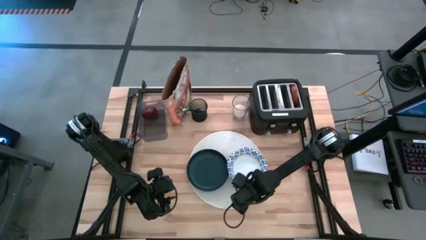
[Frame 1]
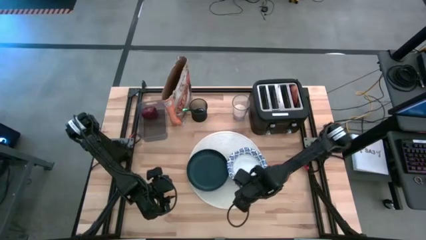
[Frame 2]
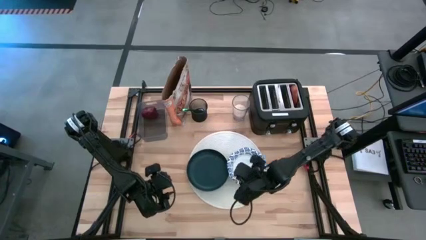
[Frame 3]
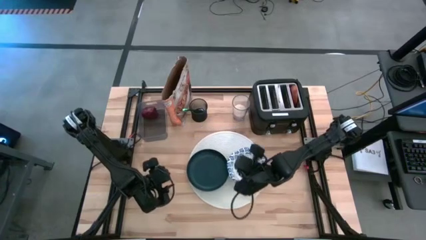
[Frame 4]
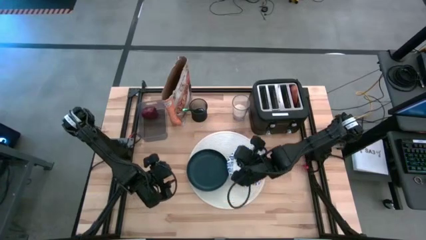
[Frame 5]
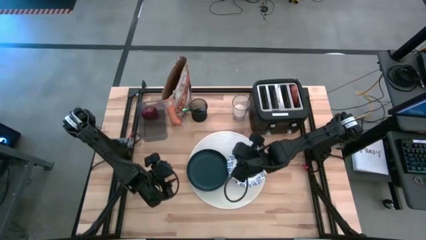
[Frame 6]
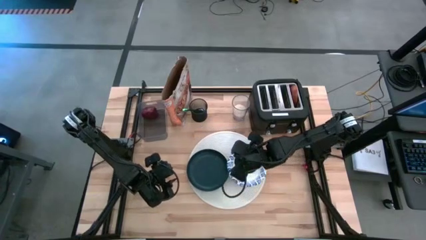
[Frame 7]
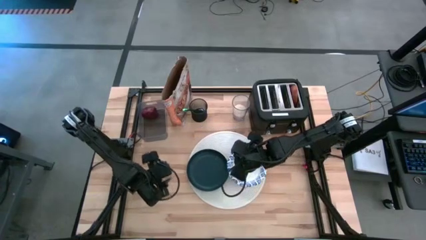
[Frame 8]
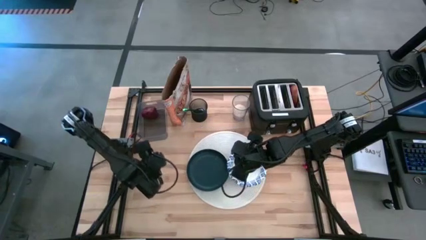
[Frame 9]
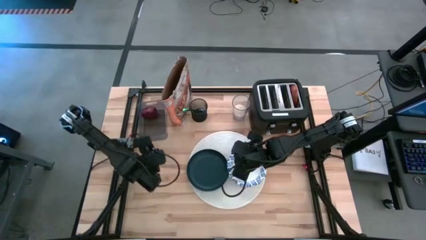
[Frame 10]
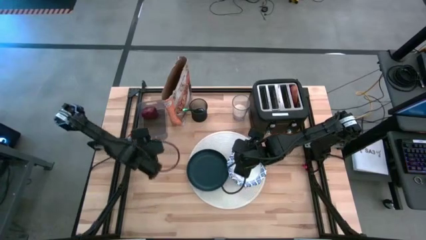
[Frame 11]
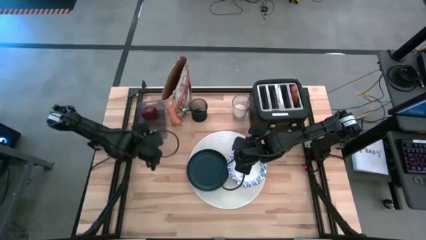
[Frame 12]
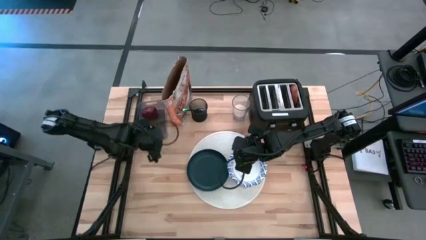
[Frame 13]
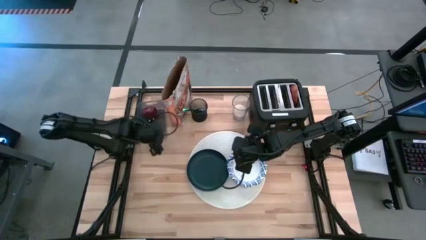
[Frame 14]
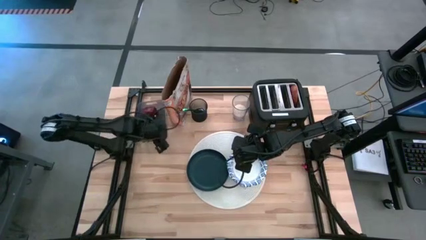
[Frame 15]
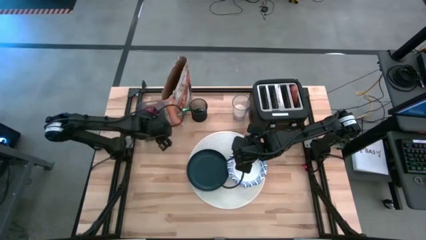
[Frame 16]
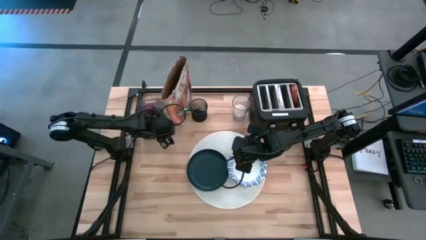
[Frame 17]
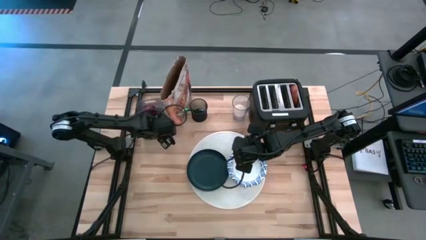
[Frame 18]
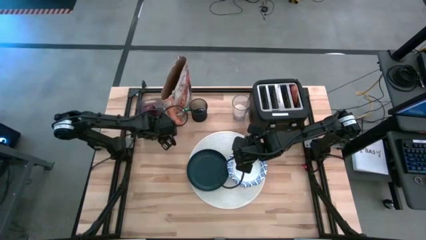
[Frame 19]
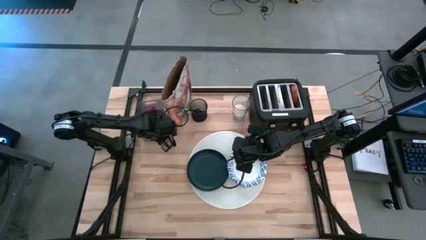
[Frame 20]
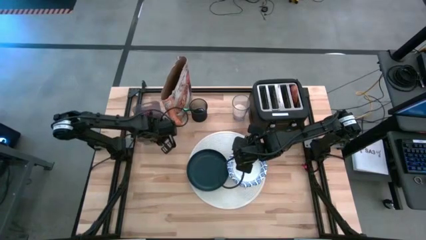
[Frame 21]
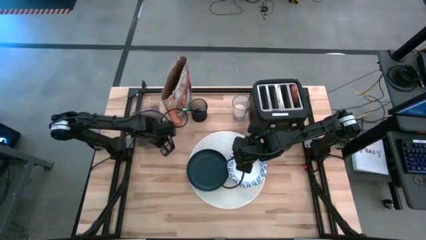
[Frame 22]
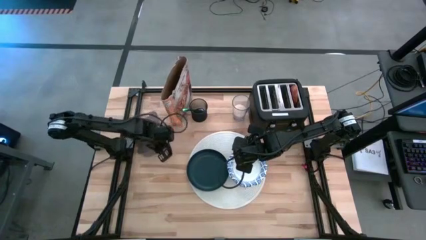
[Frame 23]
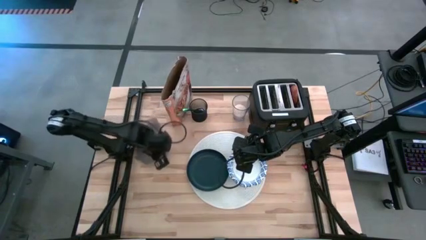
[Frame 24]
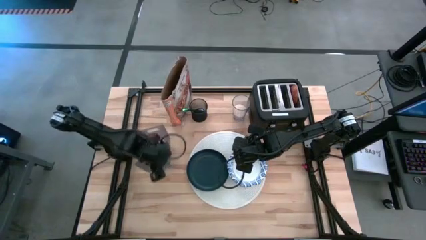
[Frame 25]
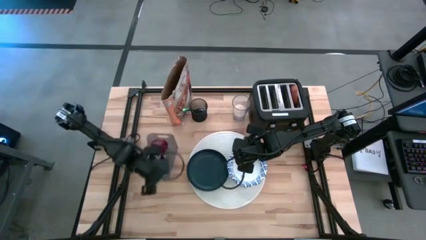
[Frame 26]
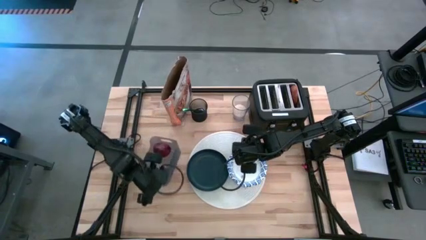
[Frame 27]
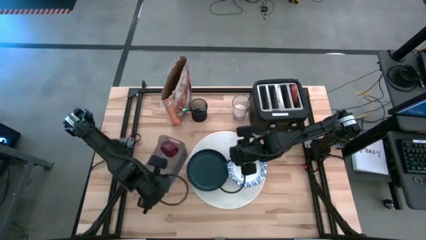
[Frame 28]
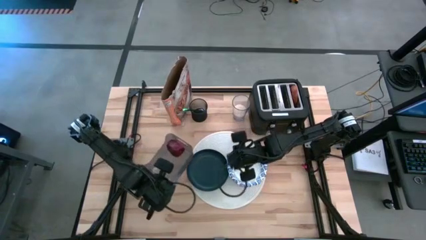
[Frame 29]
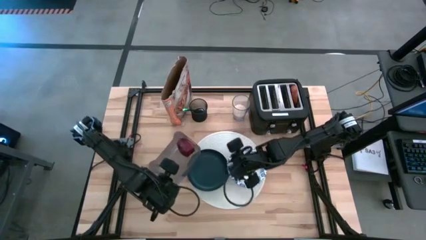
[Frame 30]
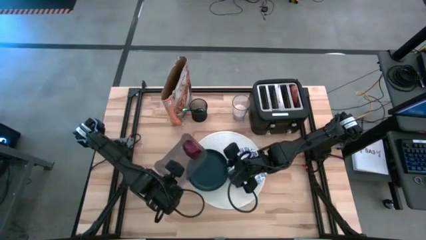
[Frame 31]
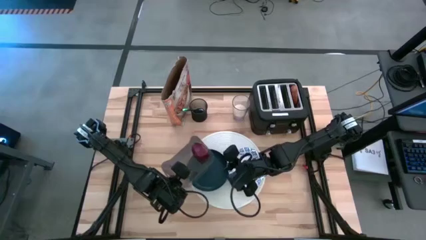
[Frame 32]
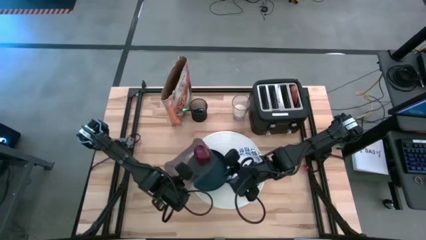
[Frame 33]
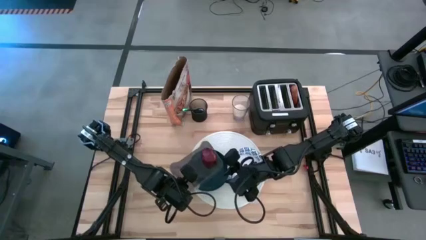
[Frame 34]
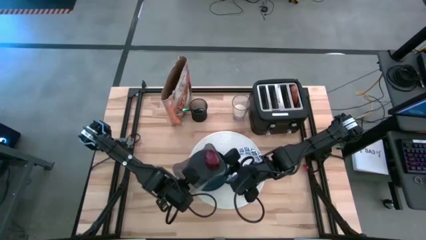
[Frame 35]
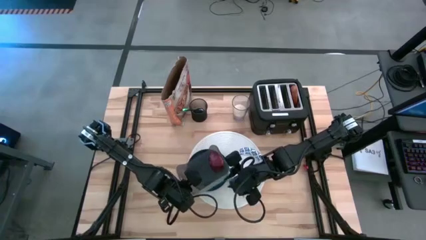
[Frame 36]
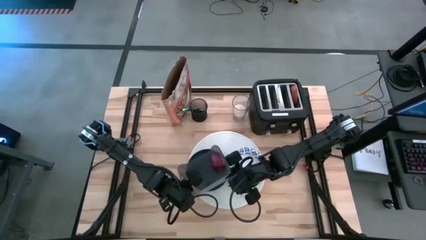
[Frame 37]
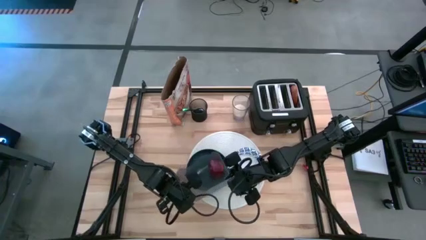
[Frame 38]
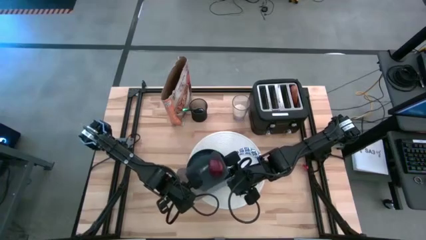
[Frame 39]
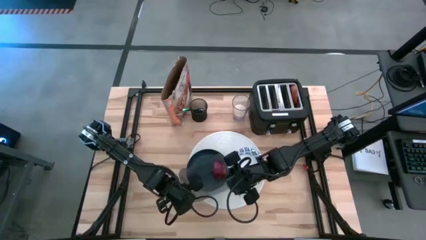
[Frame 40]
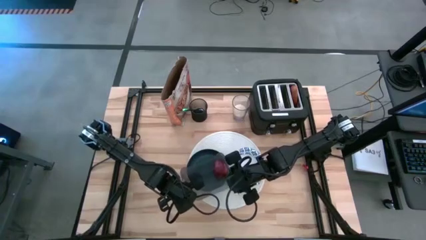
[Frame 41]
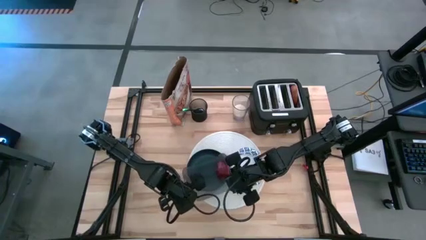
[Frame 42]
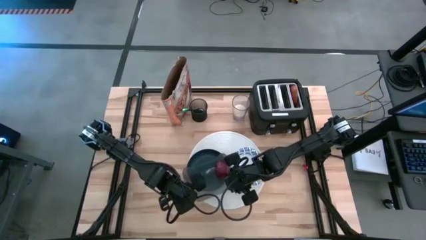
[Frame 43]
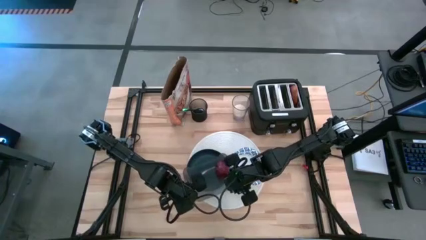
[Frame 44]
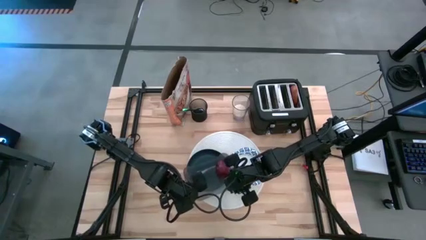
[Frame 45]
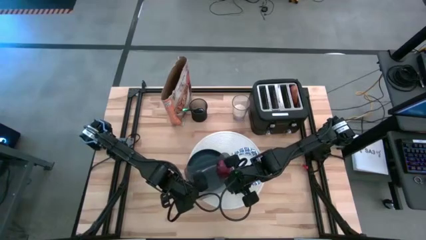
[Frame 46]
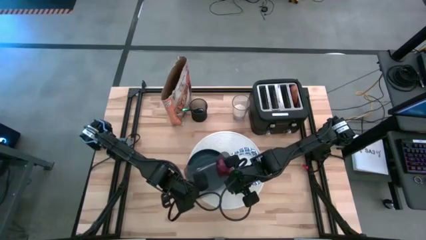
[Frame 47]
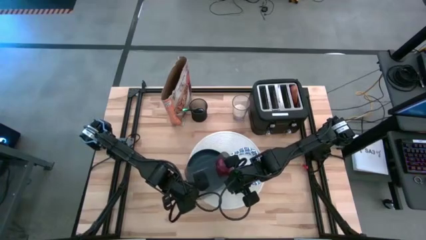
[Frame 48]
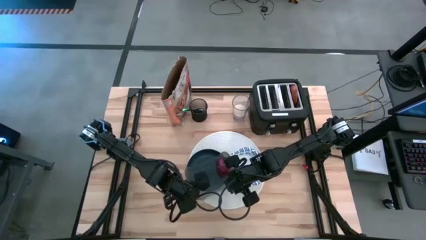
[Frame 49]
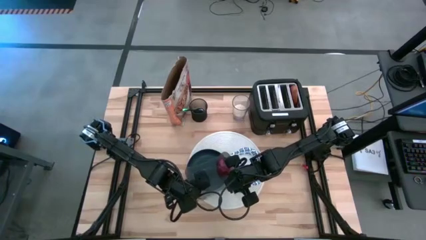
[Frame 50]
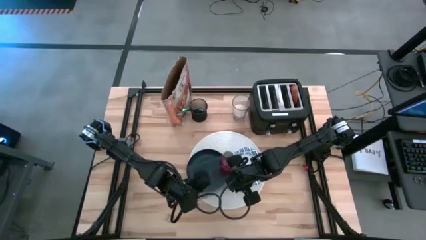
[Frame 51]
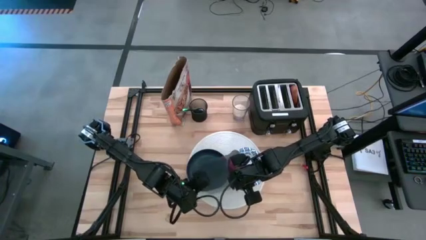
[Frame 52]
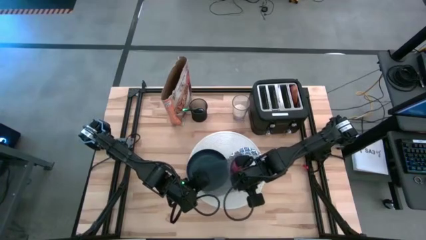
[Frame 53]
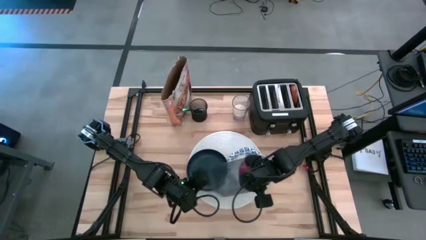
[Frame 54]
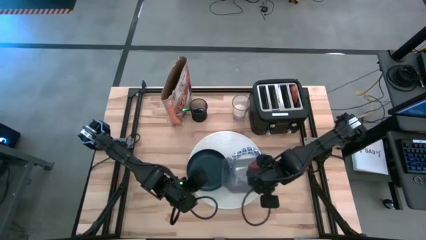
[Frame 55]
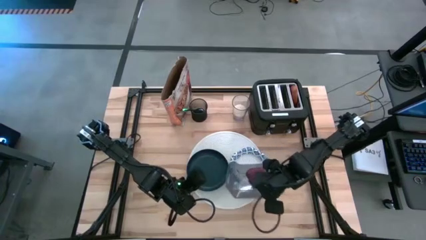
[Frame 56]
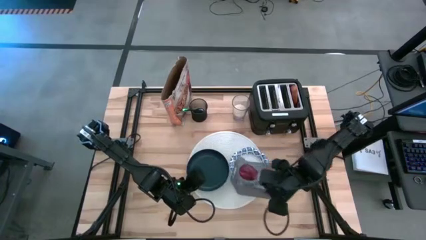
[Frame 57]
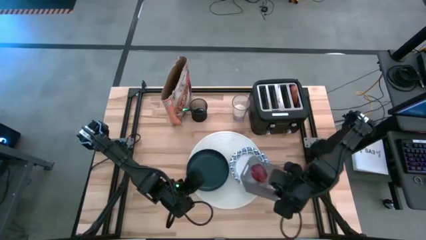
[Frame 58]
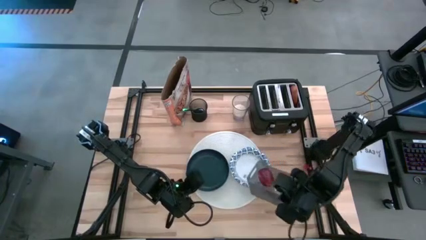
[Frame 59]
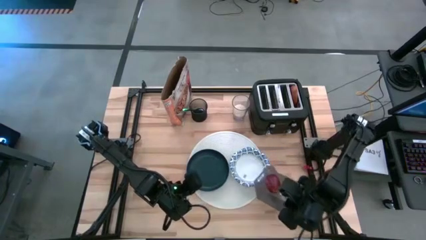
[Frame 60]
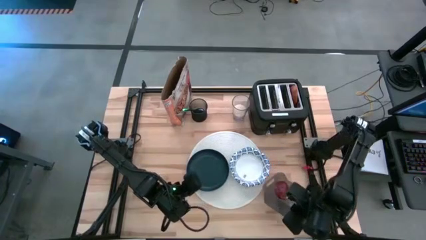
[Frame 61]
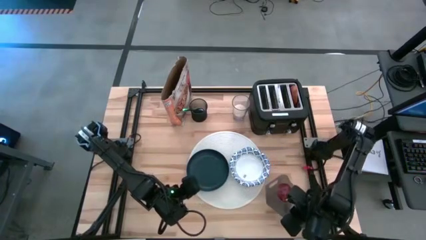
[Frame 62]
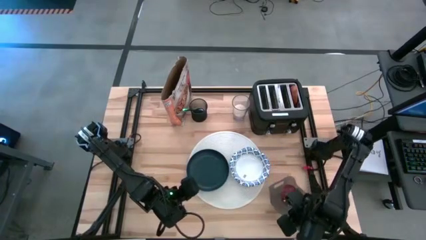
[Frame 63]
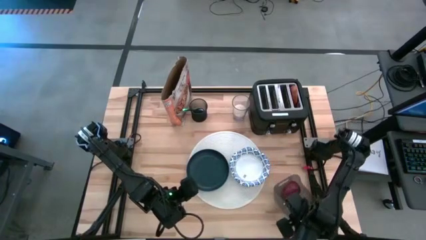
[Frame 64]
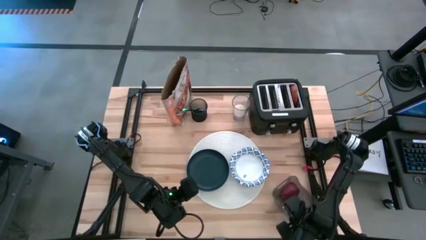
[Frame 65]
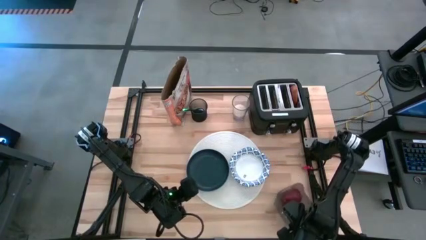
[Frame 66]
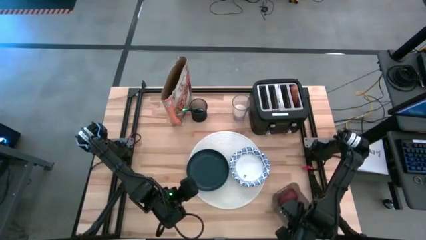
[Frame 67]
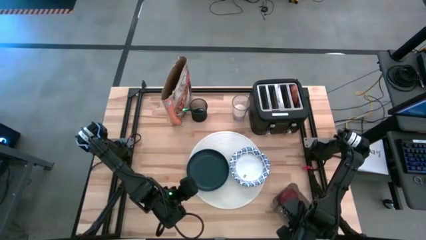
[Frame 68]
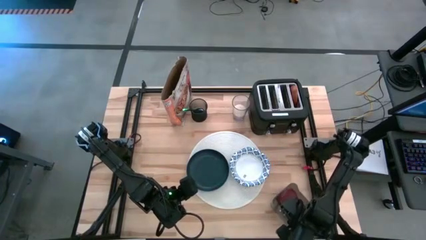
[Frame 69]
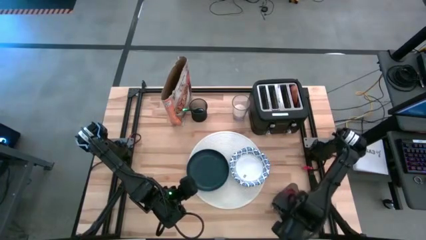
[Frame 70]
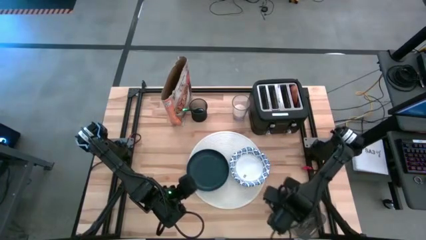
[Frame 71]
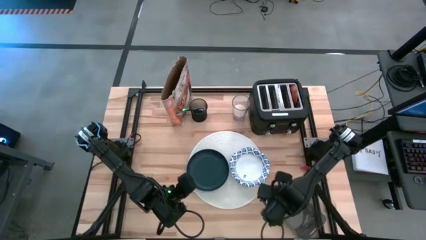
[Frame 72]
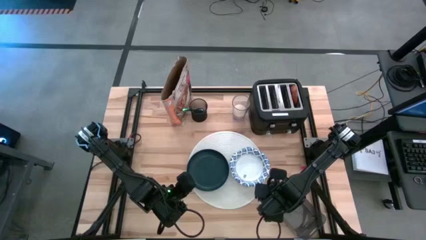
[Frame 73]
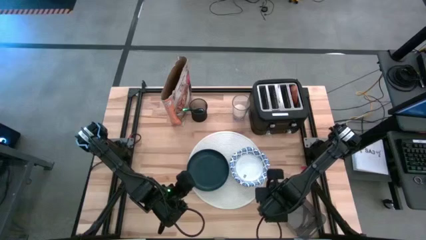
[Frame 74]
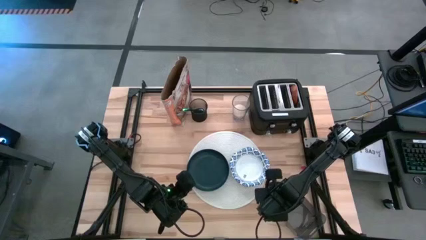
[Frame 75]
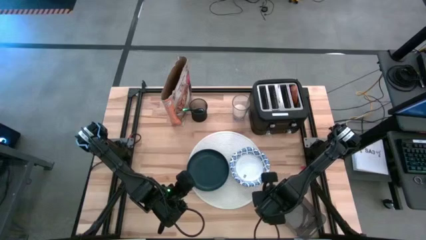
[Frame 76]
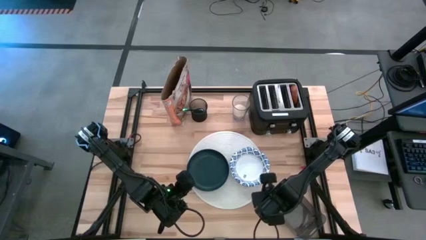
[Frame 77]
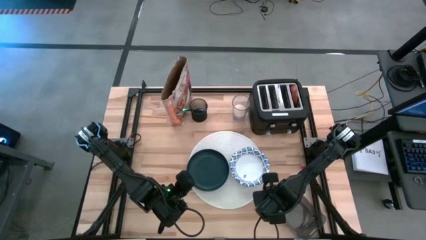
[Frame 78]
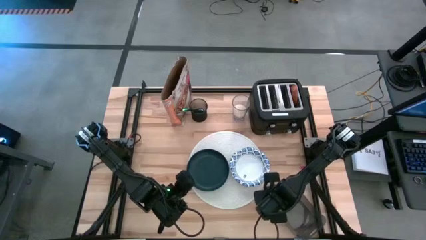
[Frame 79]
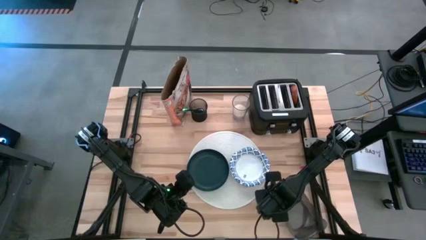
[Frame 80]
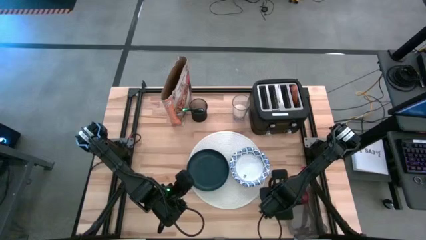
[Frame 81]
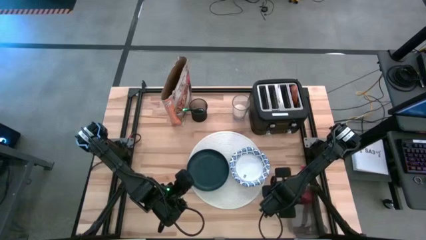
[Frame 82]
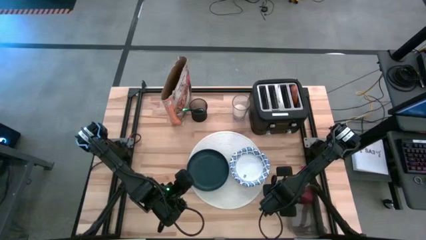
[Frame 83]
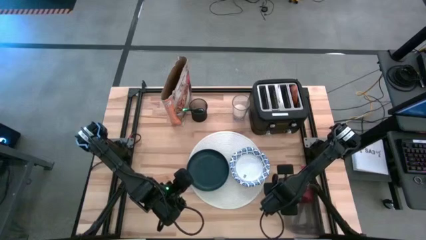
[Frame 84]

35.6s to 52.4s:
Task: Arrange a breakfast setting
Move the black bin with the red apple to the bottom right of the table
